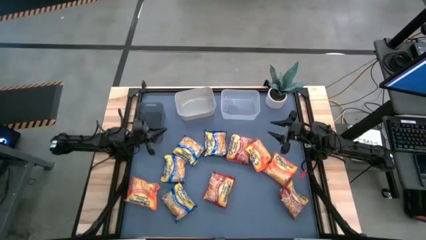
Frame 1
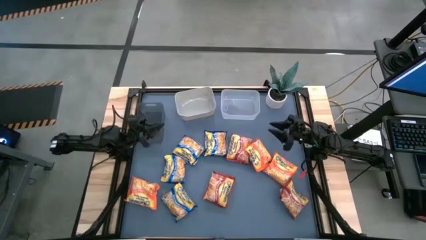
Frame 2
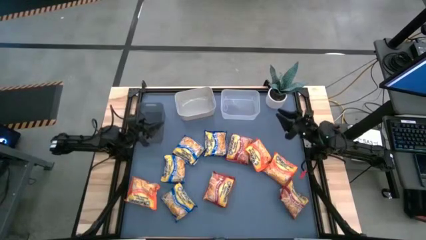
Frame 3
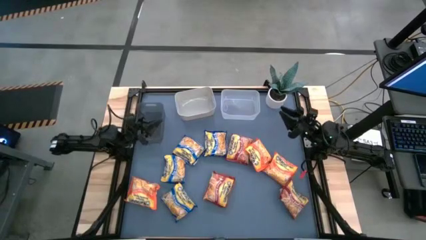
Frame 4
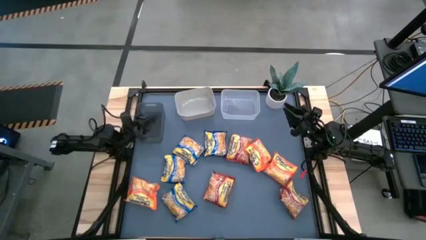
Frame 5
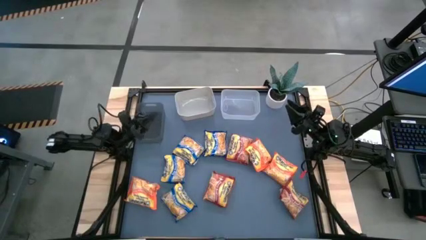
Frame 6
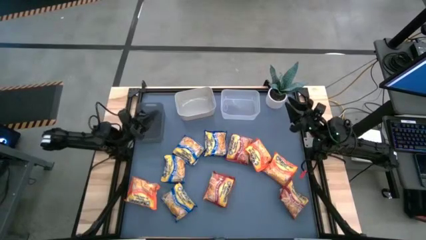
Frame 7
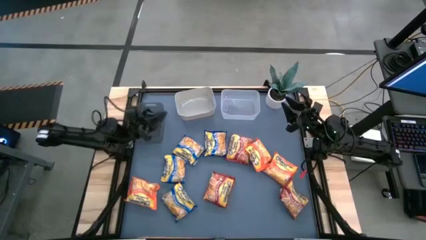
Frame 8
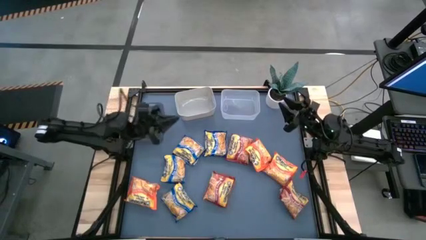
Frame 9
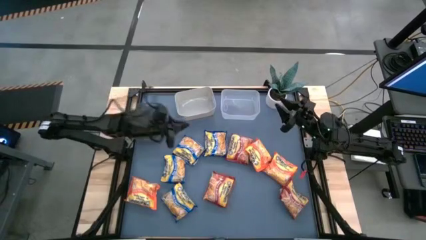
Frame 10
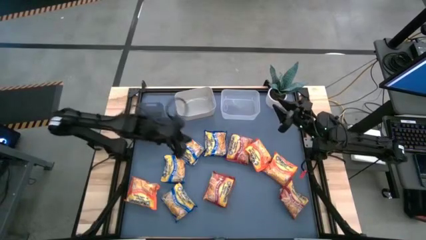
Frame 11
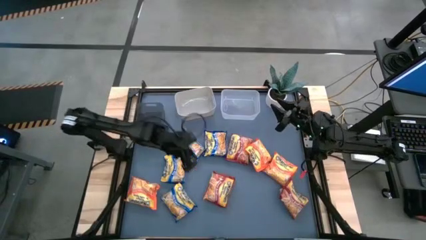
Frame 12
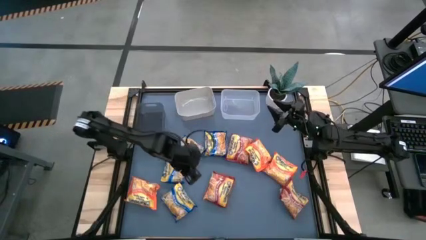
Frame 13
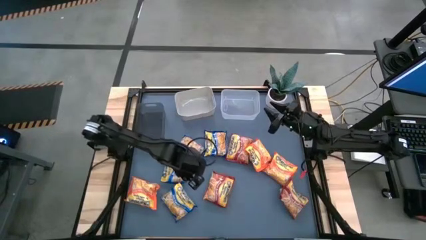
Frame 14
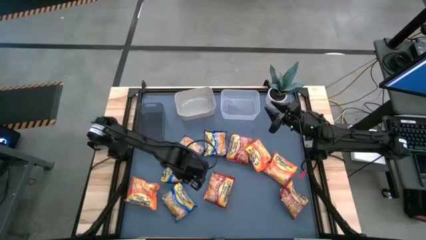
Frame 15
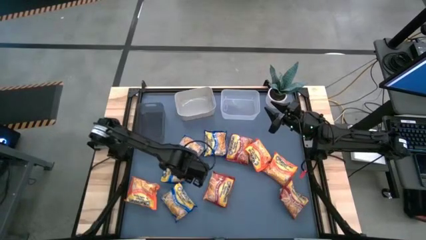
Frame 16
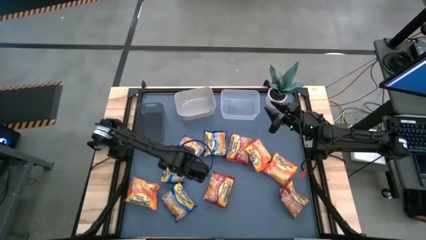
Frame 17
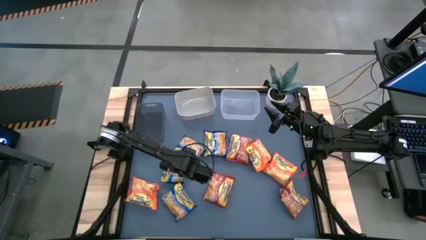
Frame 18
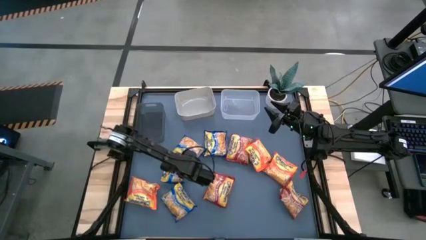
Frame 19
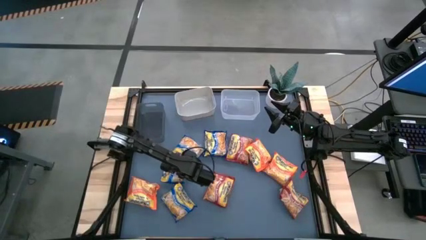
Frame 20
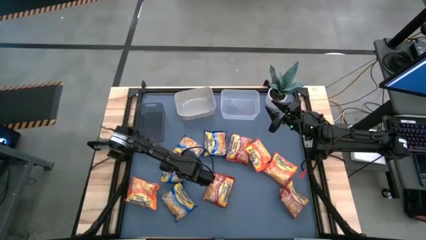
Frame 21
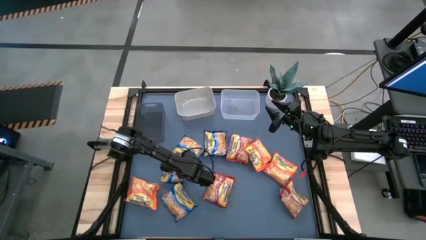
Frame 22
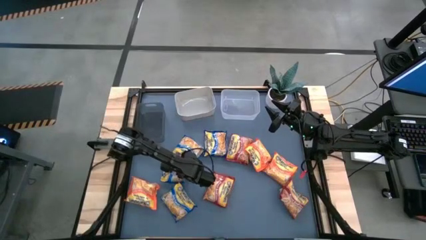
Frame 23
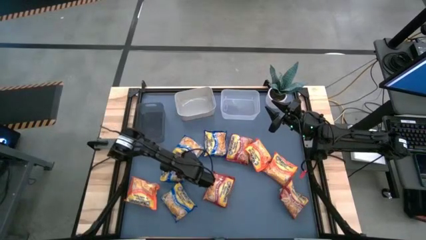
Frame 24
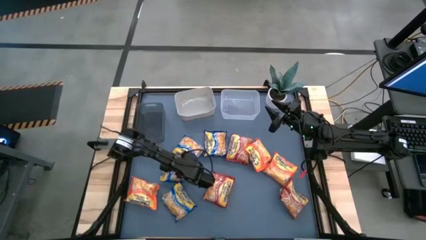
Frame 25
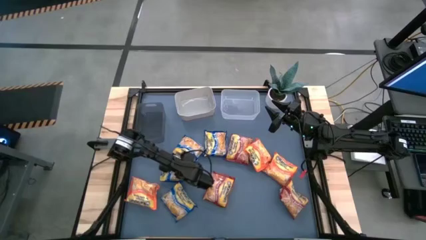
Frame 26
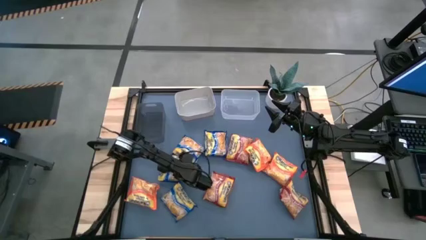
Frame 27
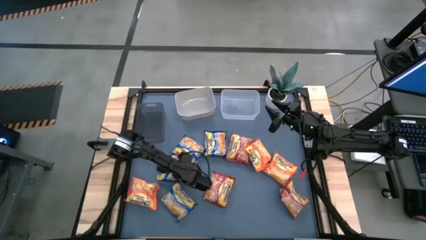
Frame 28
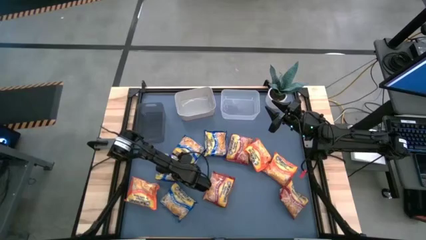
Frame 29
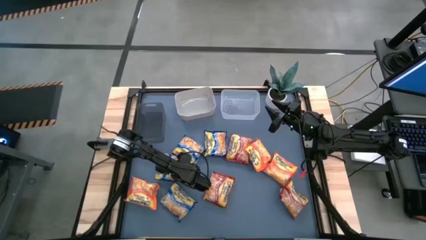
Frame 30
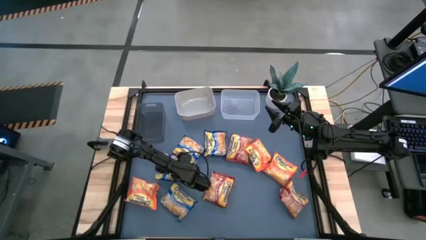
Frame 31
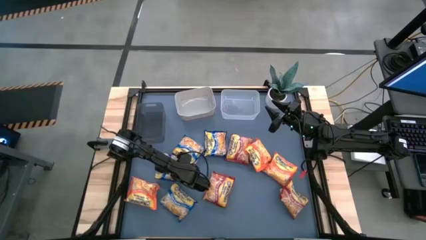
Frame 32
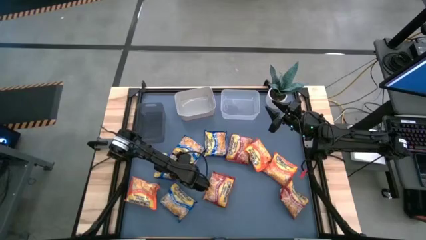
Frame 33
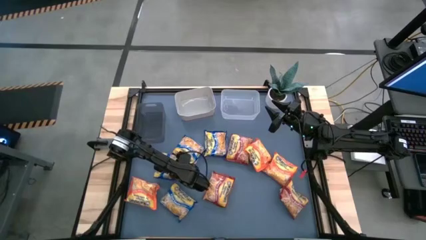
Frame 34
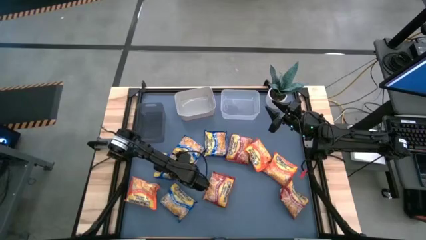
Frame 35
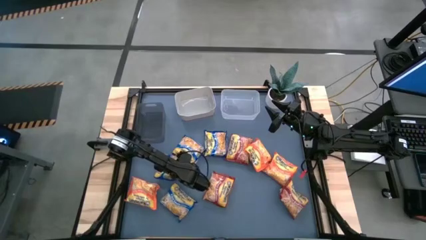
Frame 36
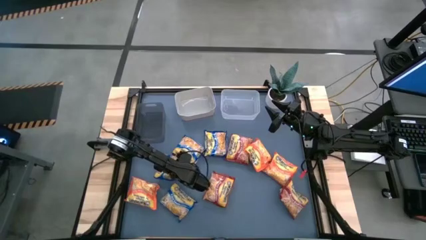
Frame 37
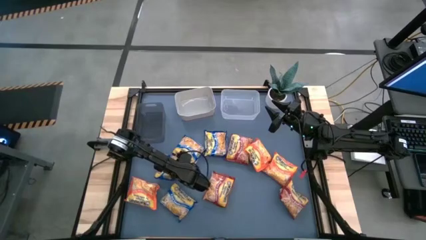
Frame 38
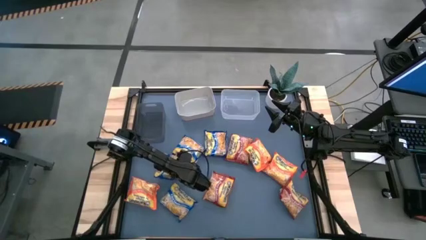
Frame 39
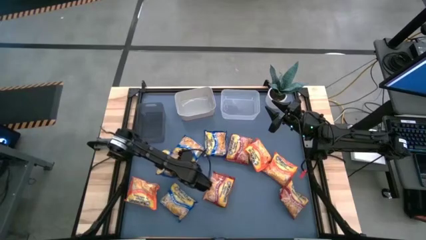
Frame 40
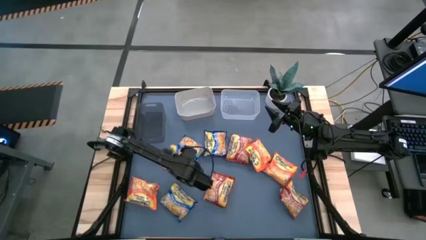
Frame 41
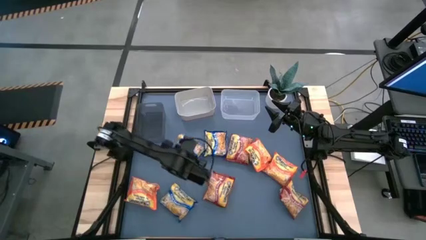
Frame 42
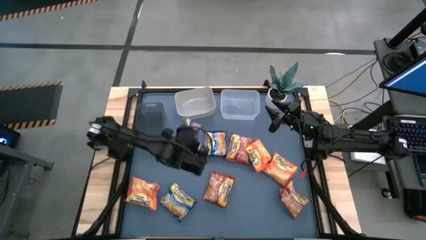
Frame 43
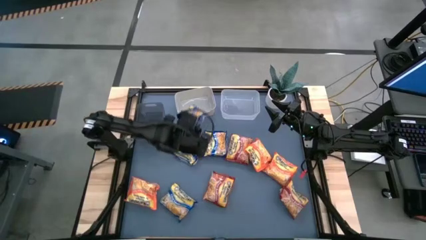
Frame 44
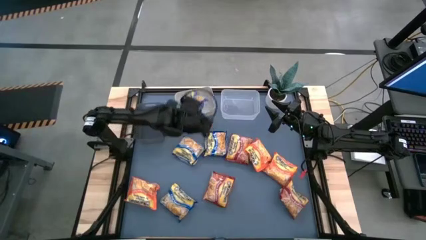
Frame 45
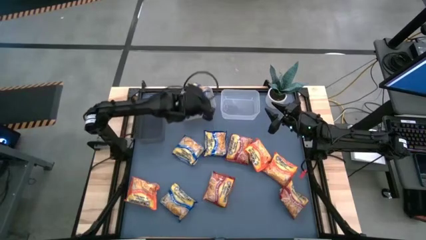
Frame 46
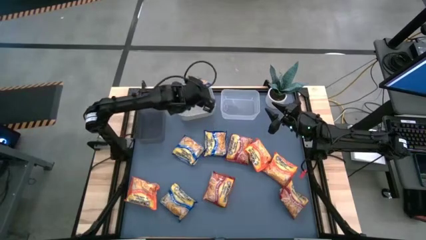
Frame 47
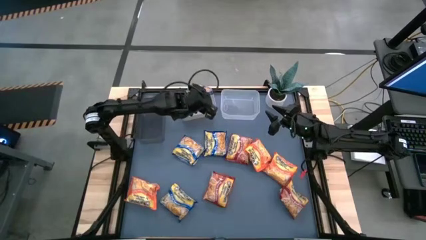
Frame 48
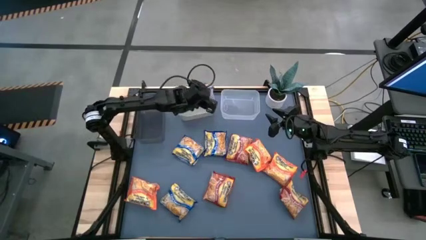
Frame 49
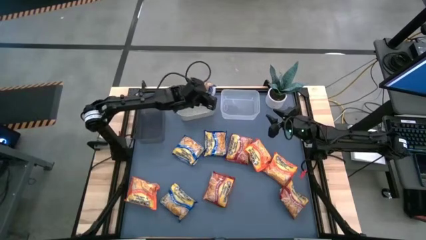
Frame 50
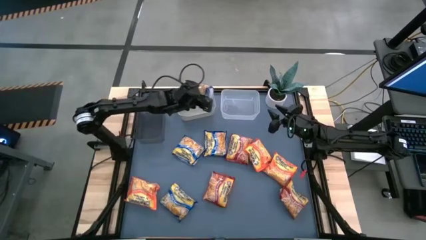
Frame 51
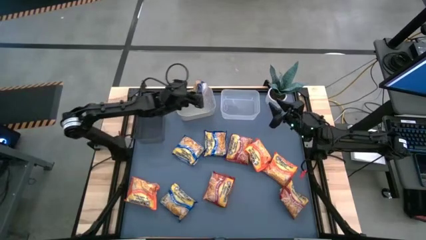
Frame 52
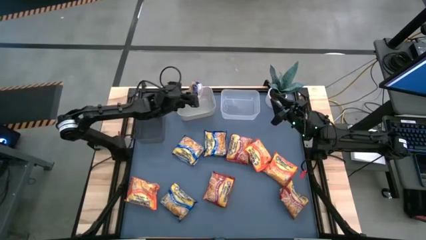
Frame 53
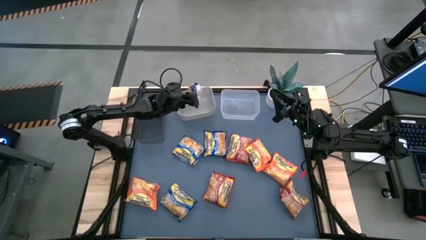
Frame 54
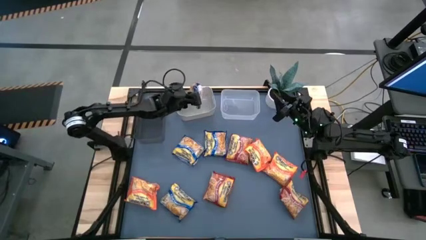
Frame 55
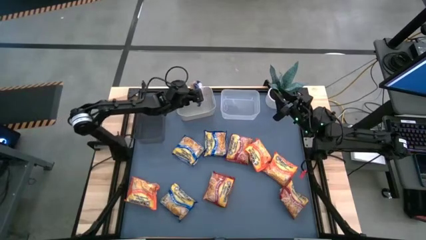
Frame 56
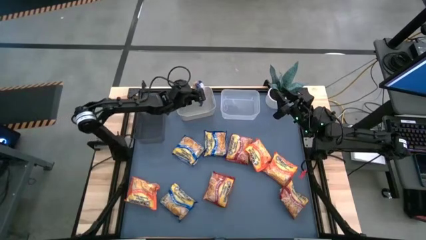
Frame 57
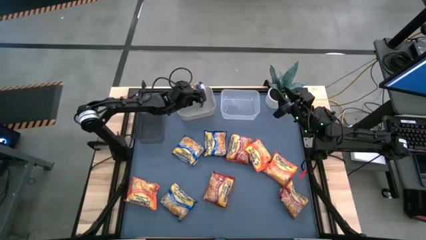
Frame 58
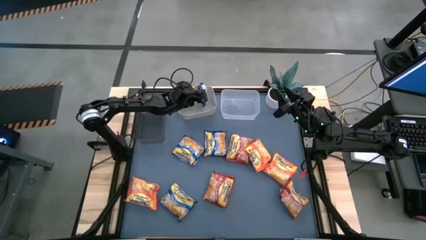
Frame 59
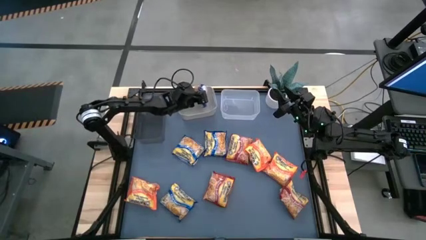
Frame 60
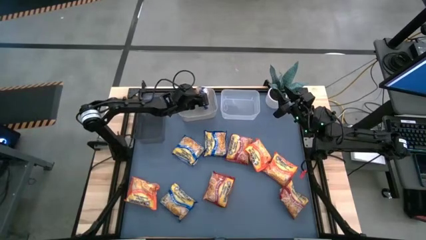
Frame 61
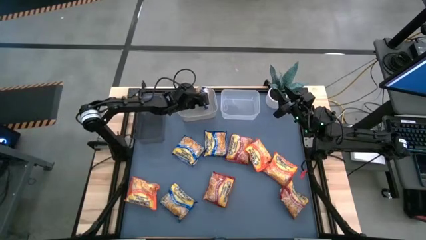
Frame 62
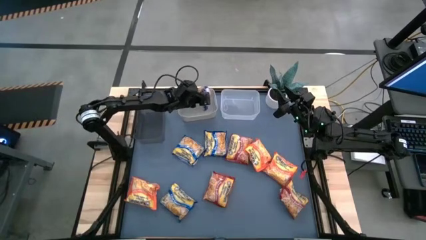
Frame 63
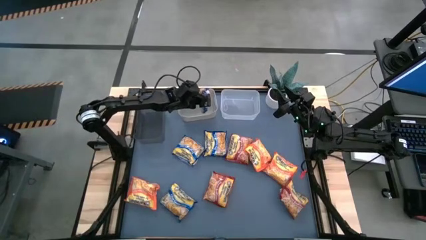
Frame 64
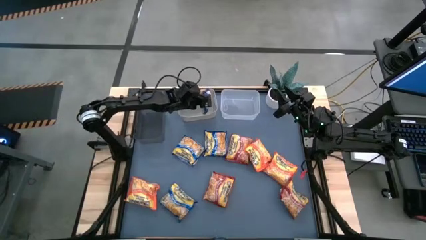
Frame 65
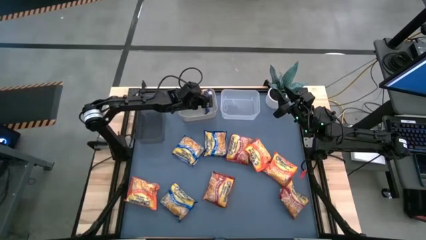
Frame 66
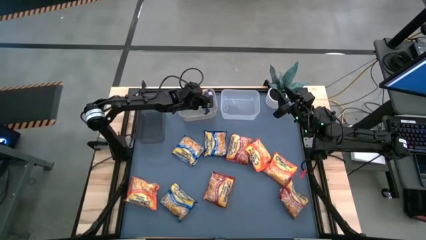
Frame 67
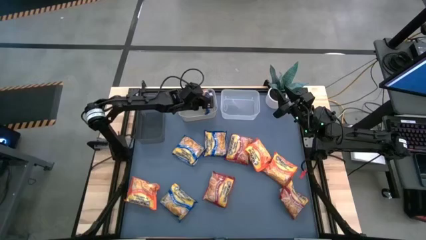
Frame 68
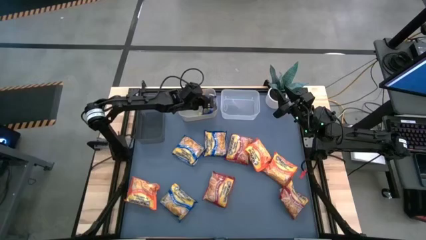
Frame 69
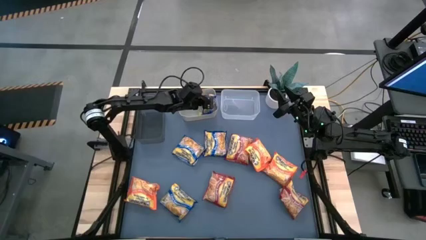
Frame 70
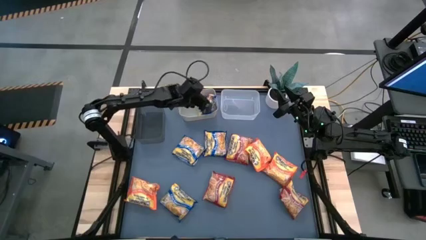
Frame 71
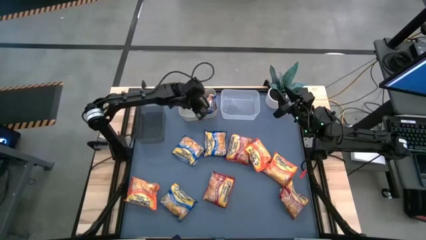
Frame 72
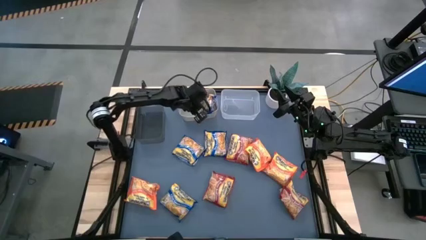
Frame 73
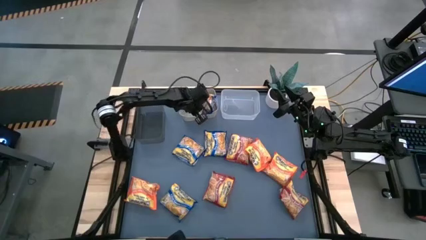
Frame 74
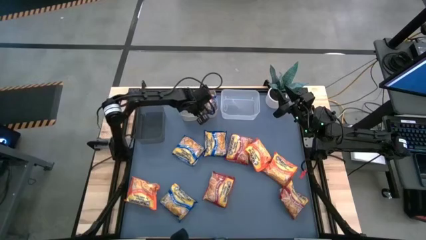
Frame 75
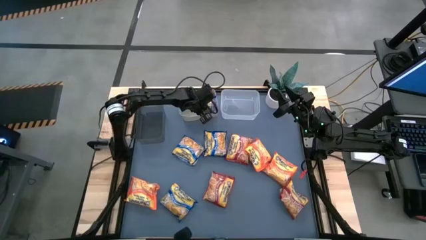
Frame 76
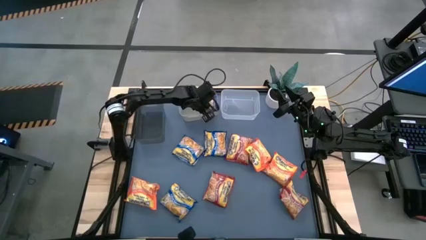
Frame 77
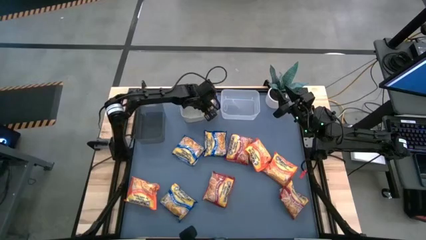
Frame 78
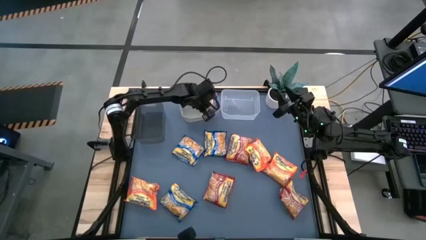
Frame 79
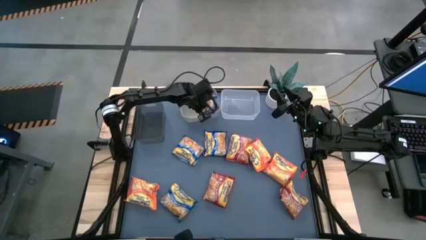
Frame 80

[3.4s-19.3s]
Task: Sort Maruchan noodles
Put the blue noodle pack into the gray bin
